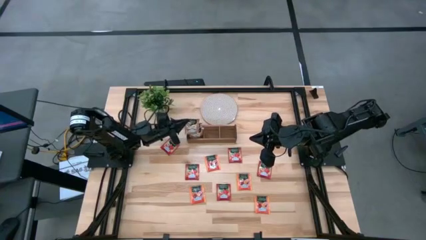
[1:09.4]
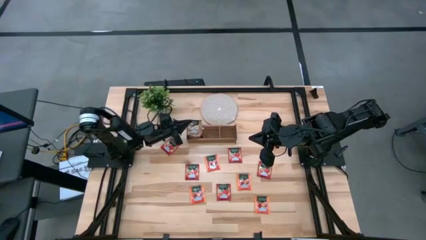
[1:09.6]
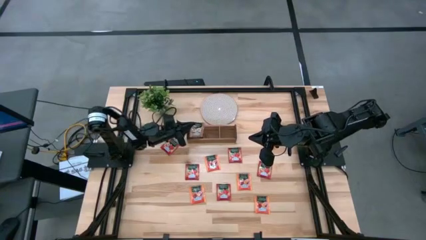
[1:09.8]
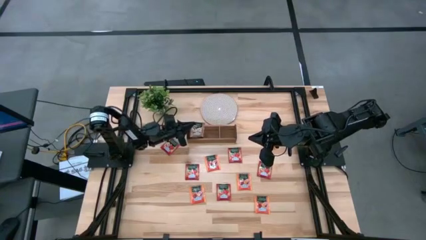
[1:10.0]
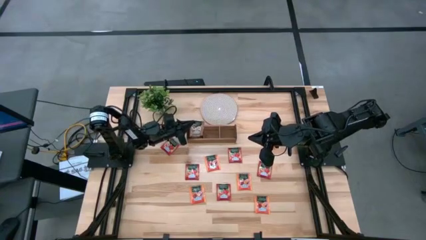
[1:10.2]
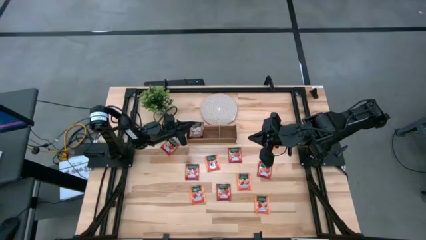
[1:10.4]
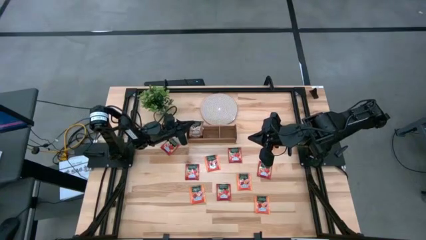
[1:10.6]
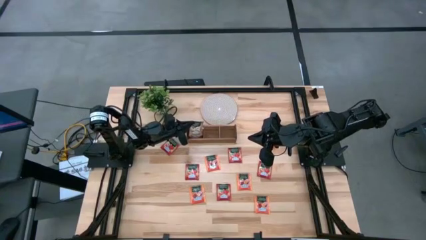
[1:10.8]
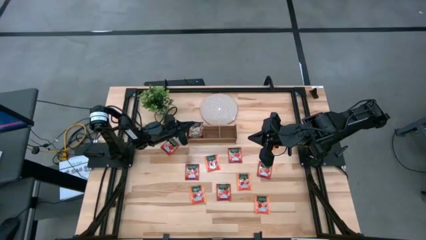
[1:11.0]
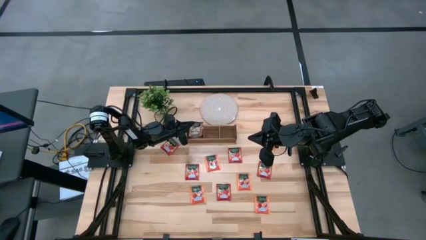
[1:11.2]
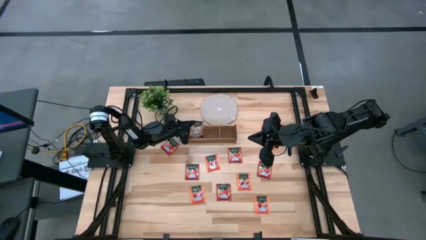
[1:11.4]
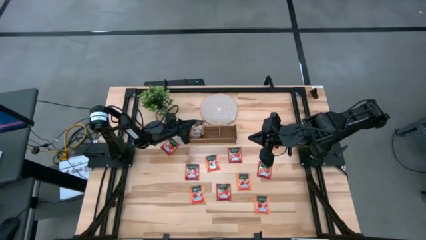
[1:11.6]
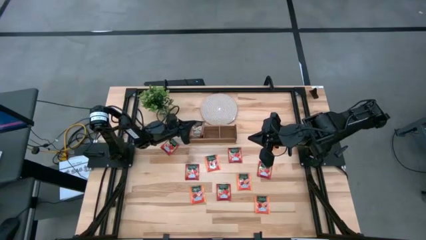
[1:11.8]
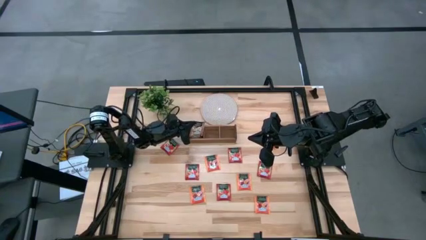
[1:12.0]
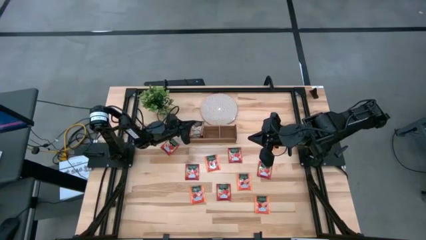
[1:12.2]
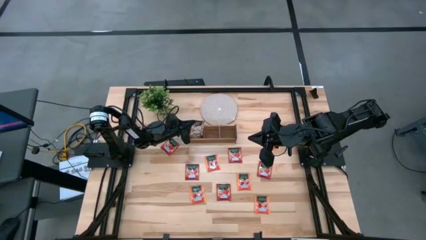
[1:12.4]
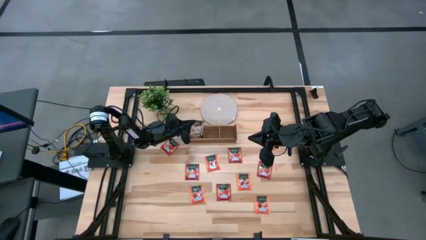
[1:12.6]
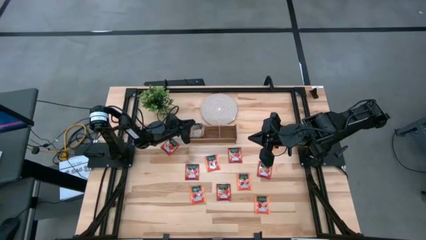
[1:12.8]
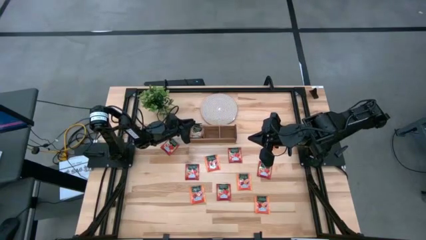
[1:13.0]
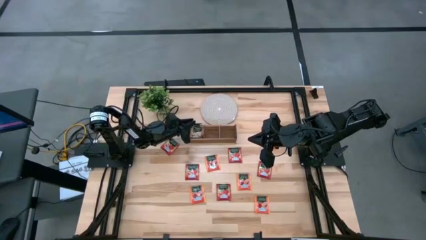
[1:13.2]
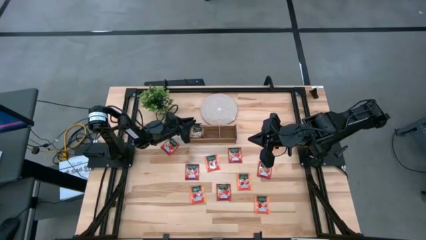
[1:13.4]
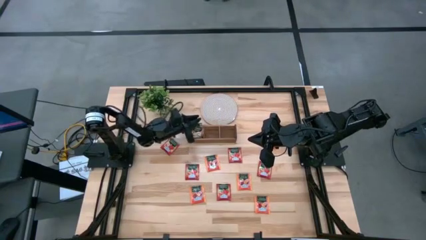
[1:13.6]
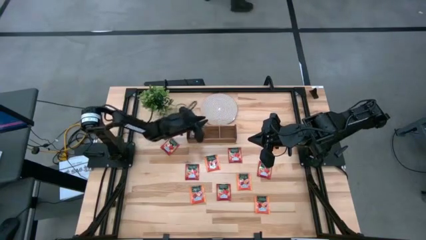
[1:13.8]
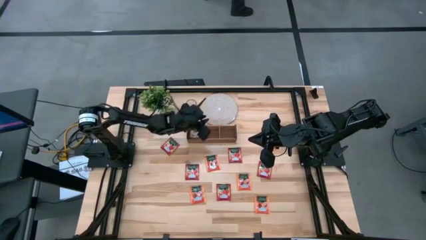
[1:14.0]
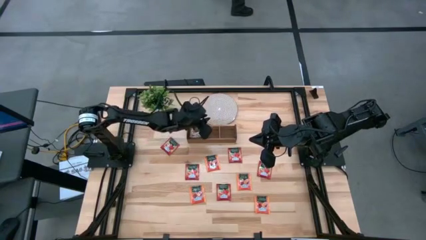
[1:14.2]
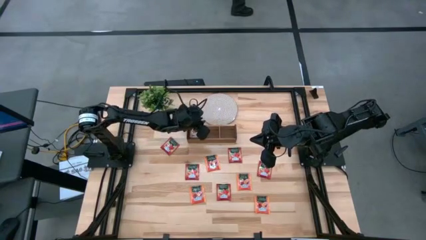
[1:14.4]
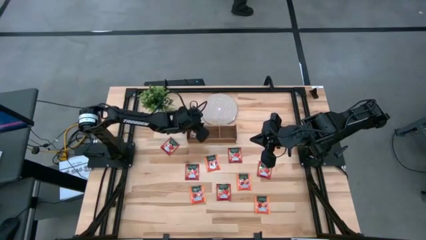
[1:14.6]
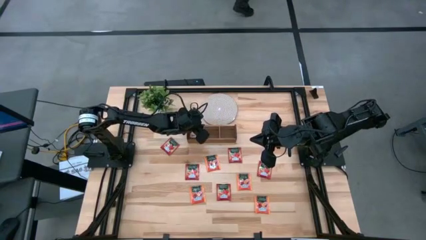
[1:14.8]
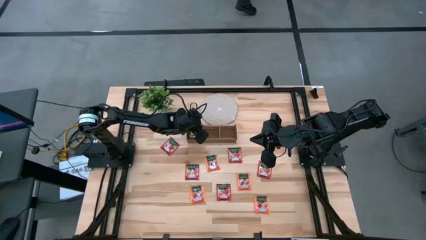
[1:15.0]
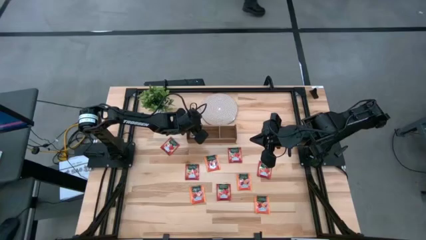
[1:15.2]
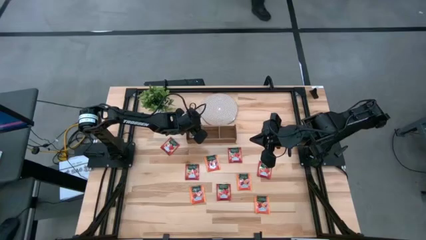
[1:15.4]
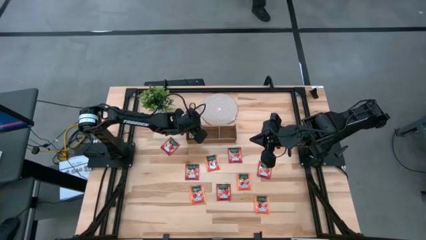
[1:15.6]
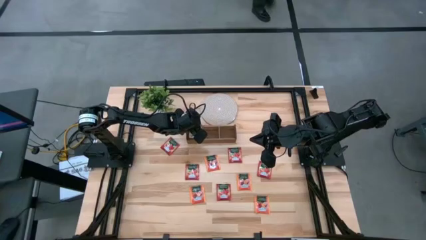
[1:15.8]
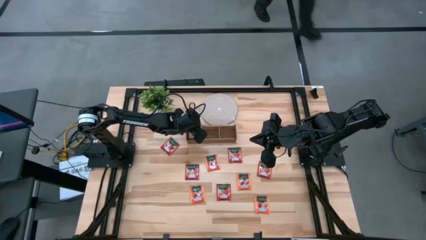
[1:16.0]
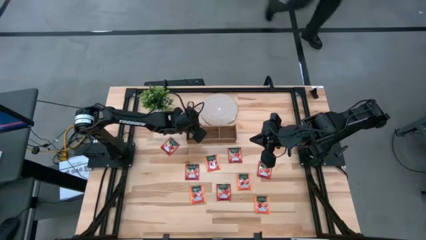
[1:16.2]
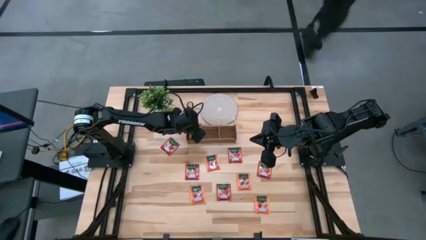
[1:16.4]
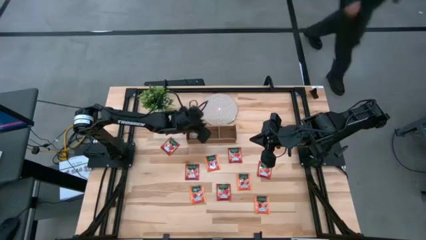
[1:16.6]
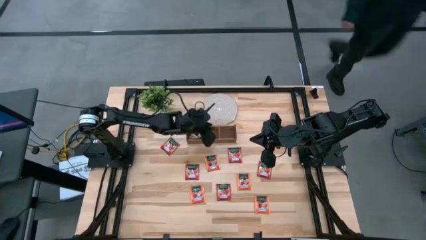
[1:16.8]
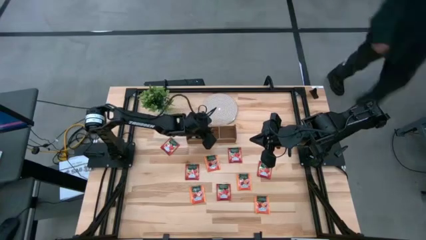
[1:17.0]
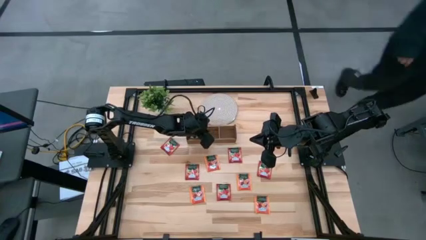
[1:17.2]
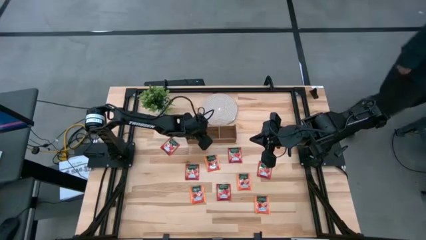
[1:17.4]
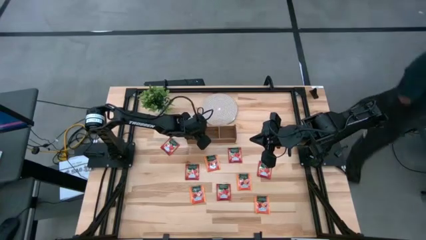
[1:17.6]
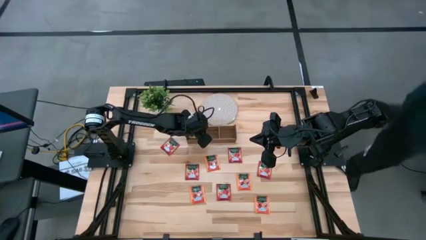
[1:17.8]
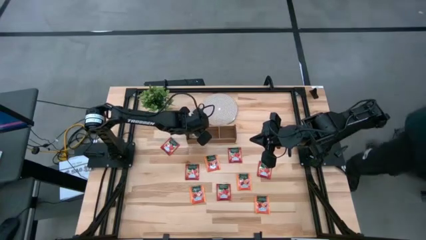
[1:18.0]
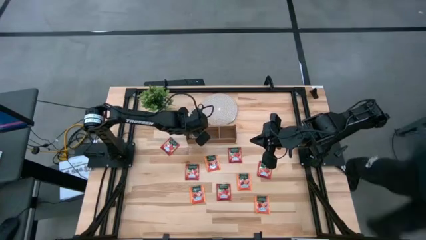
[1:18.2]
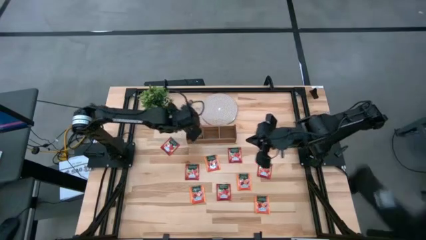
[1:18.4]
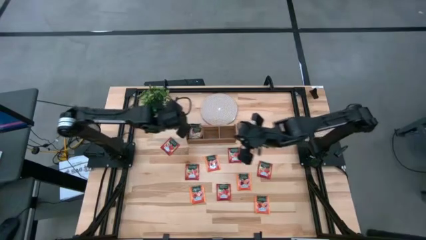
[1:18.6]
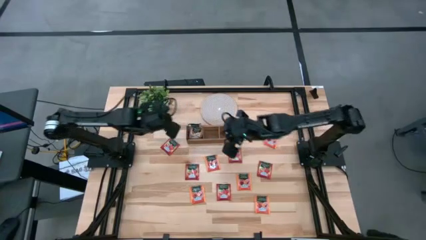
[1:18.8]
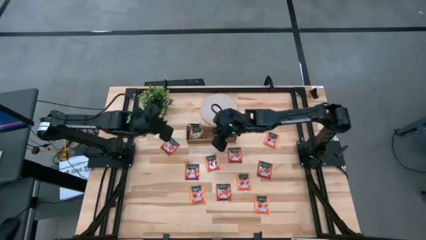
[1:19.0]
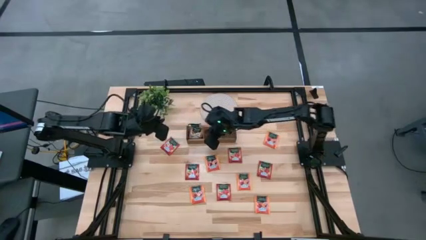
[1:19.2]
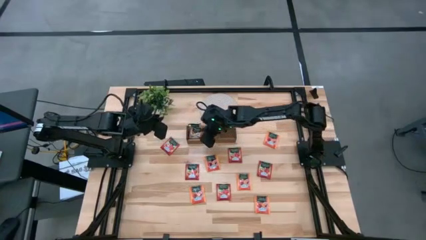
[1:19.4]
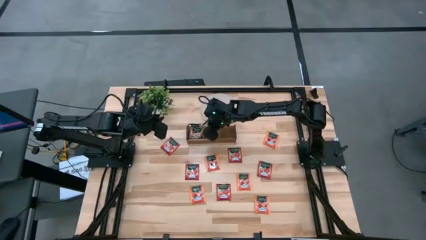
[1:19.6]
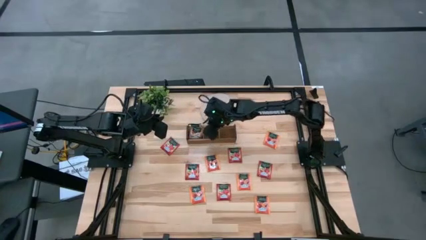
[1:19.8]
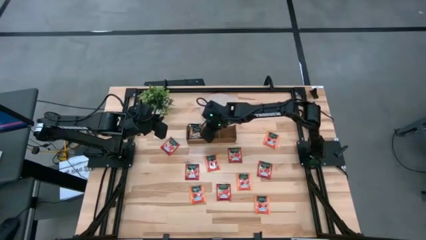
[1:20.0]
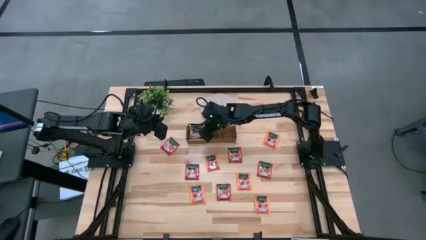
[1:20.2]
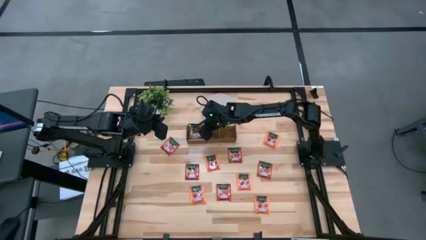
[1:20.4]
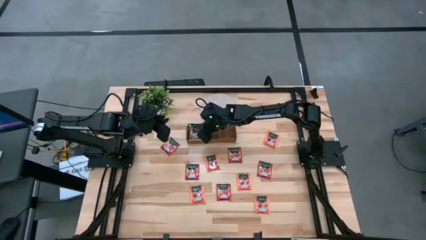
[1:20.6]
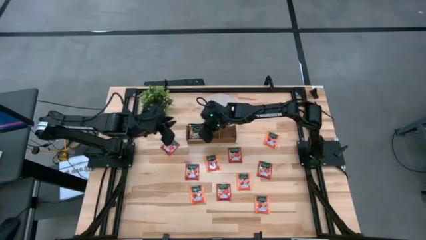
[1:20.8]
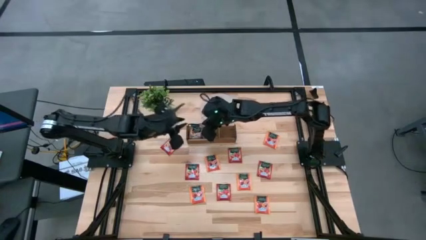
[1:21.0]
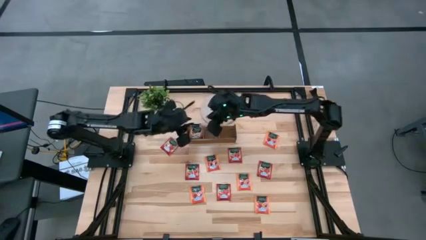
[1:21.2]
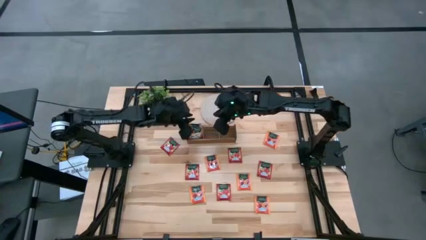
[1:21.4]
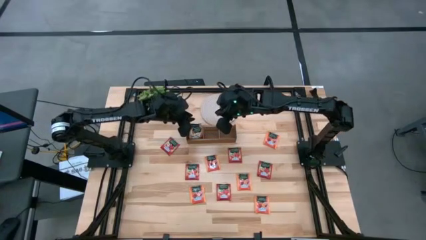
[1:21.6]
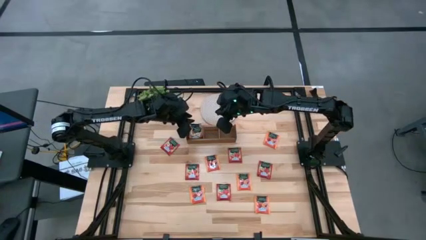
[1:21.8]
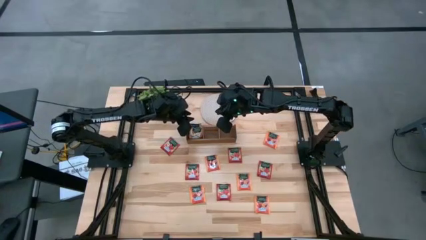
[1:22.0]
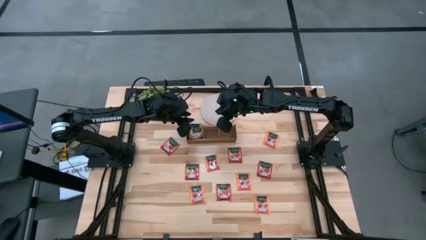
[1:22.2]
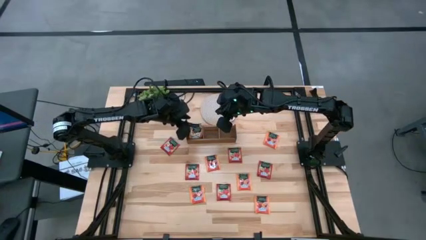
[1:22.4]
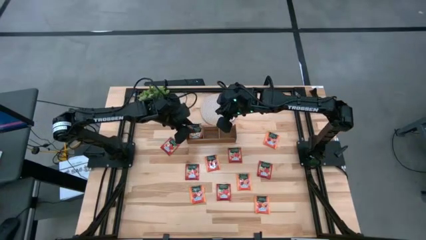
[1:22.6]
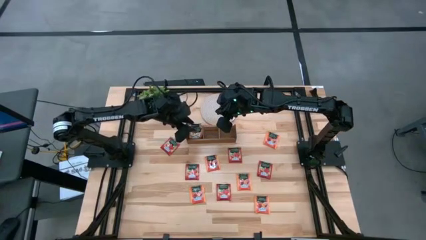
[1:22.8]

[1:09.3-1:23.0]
Task: Pick & Place Tea
Put the brown tea bag into the left of the wooden organizer
